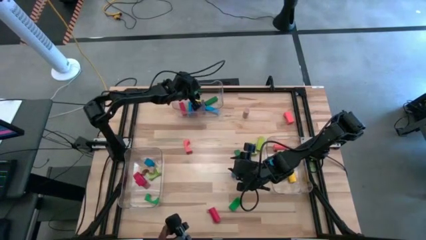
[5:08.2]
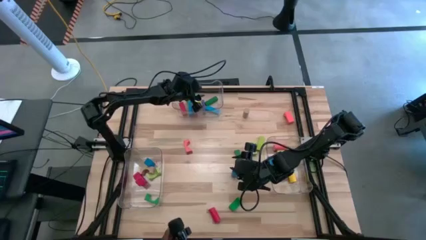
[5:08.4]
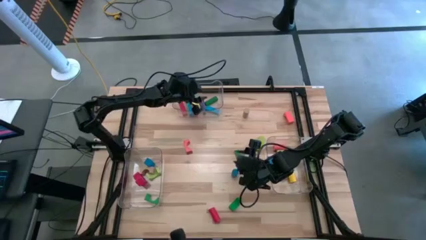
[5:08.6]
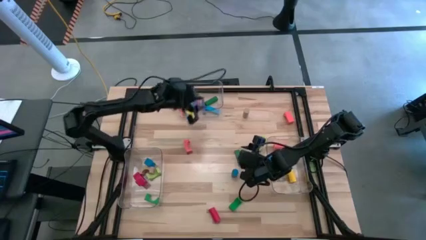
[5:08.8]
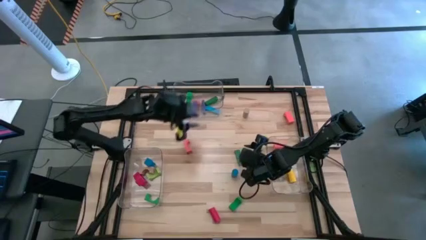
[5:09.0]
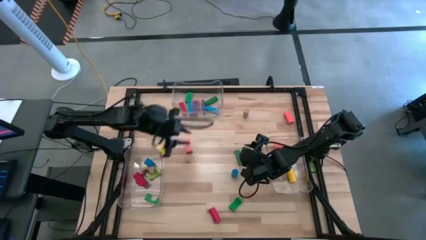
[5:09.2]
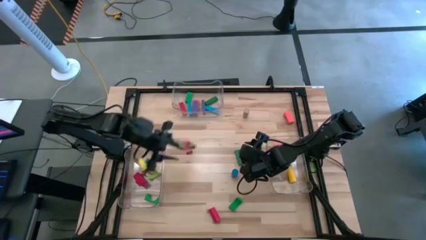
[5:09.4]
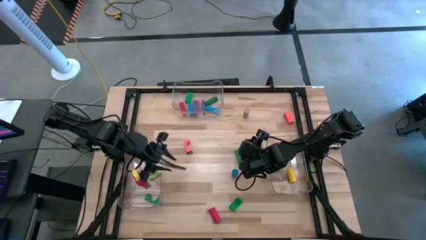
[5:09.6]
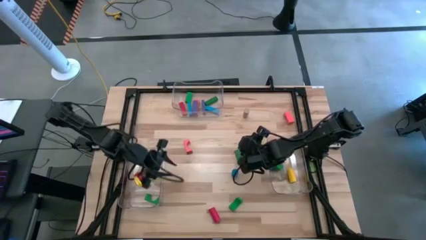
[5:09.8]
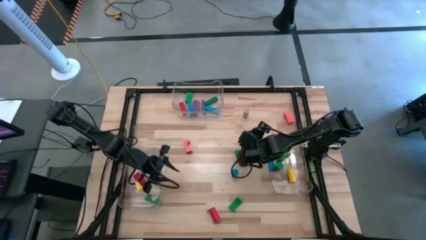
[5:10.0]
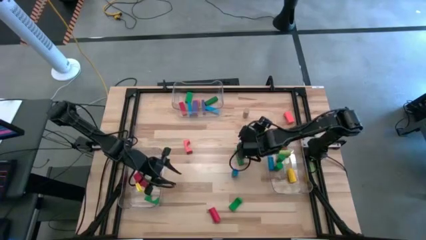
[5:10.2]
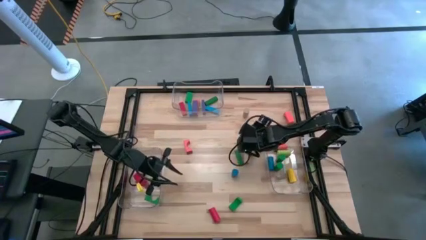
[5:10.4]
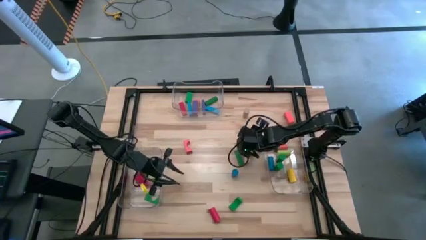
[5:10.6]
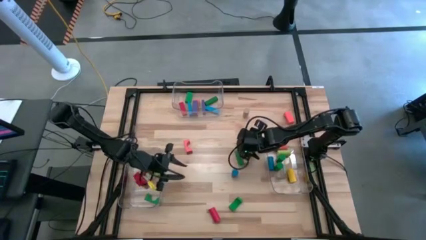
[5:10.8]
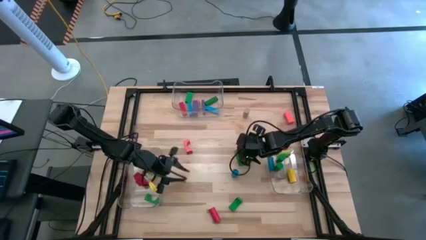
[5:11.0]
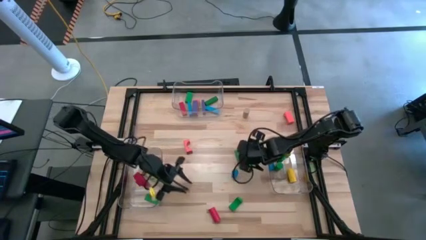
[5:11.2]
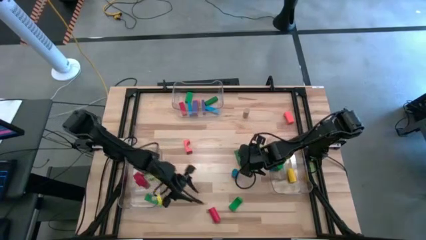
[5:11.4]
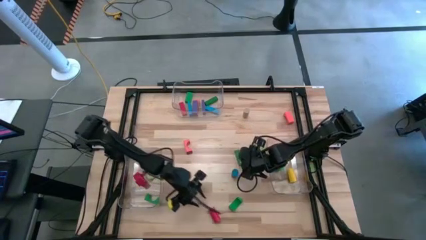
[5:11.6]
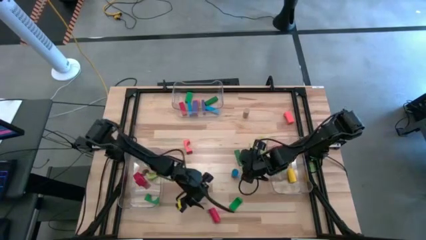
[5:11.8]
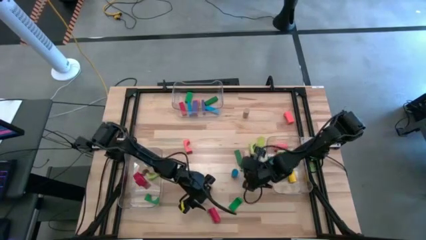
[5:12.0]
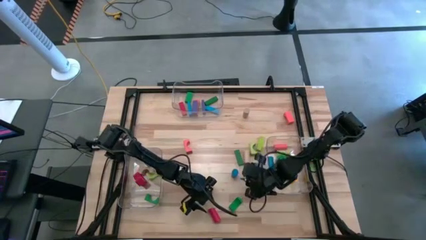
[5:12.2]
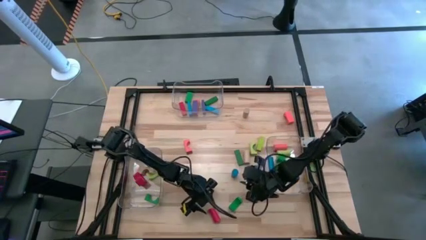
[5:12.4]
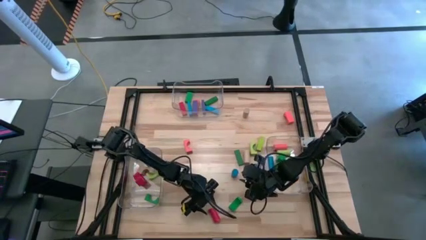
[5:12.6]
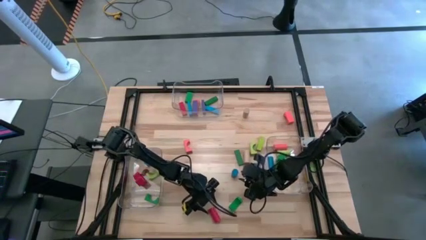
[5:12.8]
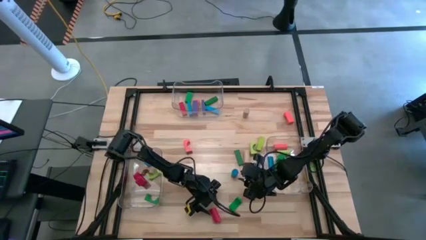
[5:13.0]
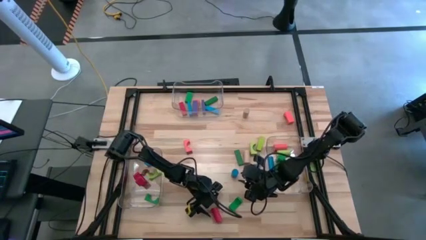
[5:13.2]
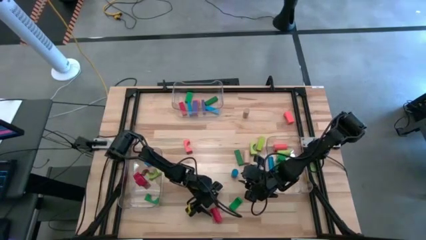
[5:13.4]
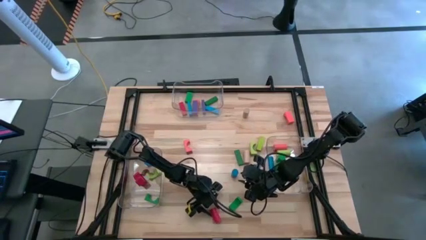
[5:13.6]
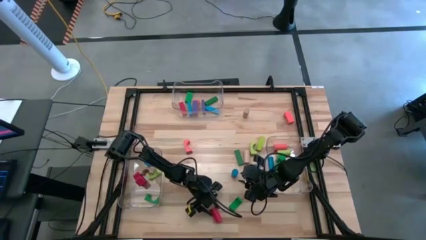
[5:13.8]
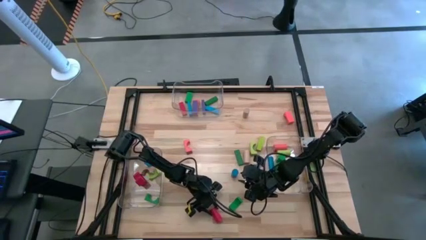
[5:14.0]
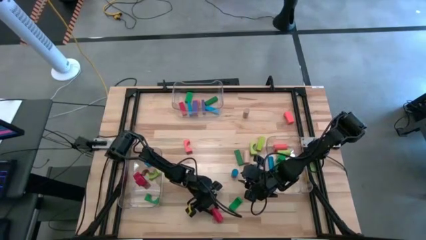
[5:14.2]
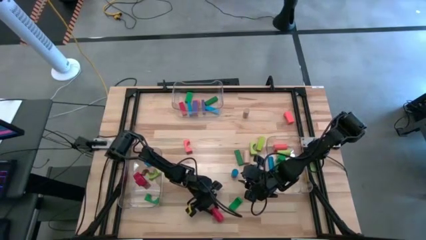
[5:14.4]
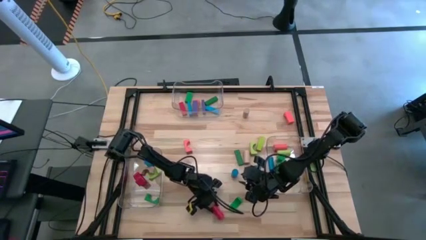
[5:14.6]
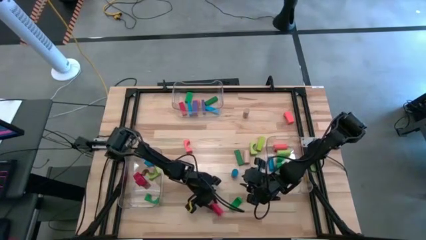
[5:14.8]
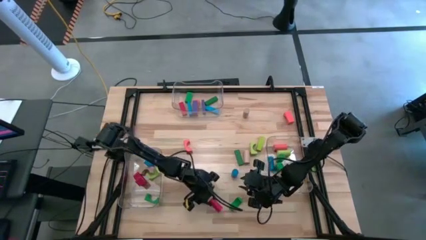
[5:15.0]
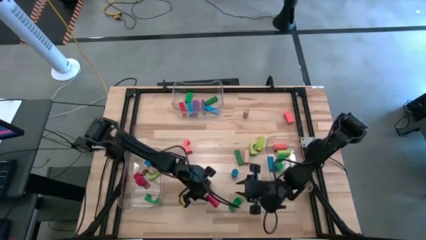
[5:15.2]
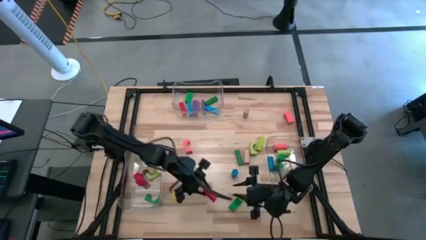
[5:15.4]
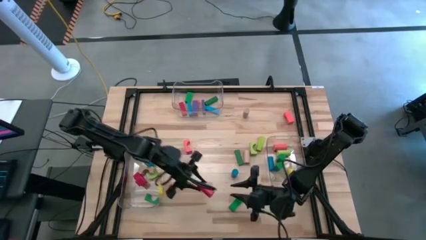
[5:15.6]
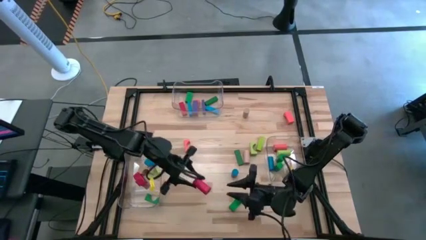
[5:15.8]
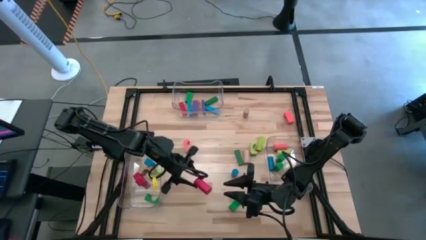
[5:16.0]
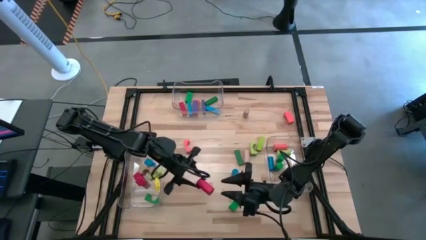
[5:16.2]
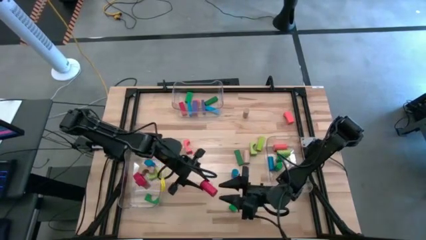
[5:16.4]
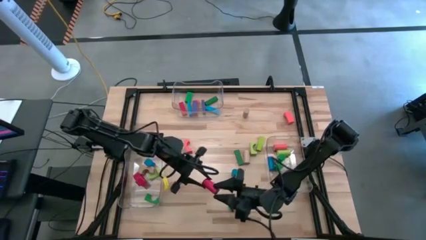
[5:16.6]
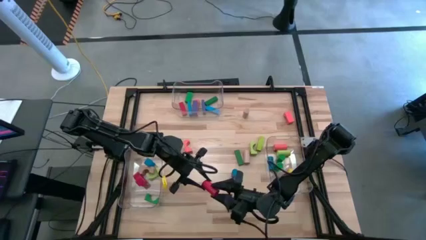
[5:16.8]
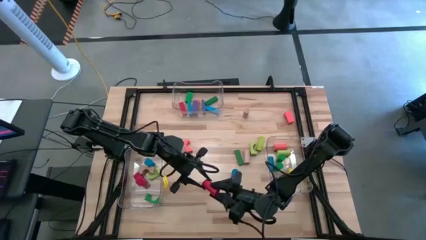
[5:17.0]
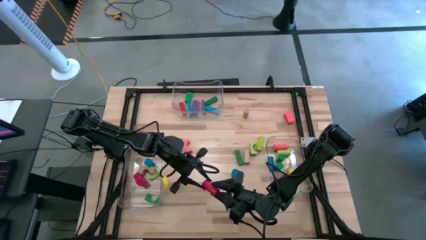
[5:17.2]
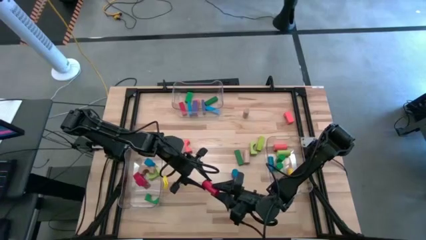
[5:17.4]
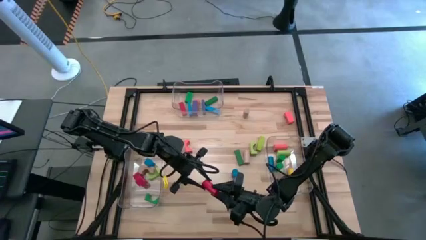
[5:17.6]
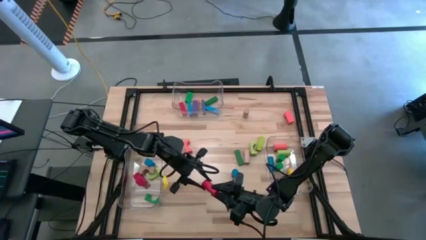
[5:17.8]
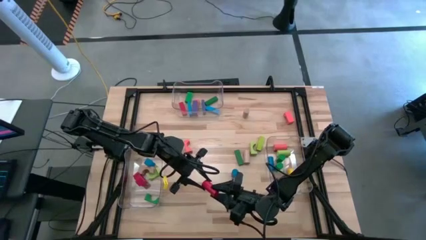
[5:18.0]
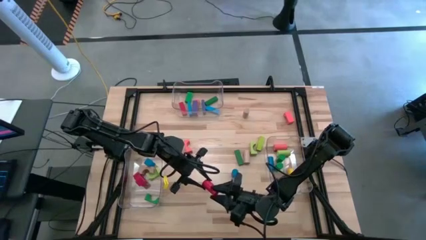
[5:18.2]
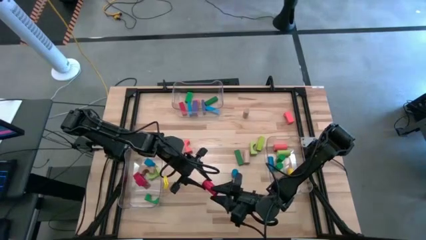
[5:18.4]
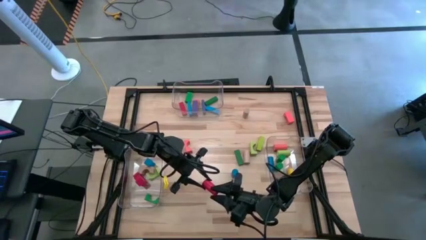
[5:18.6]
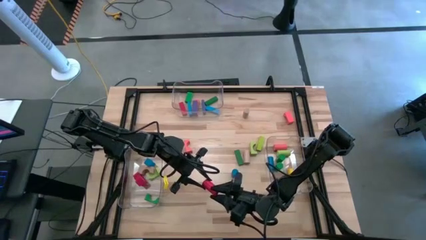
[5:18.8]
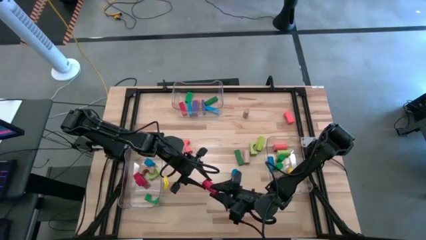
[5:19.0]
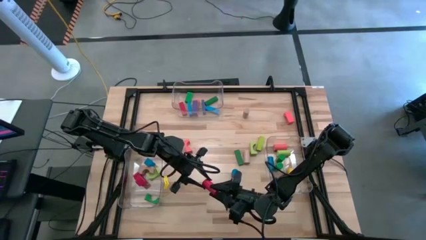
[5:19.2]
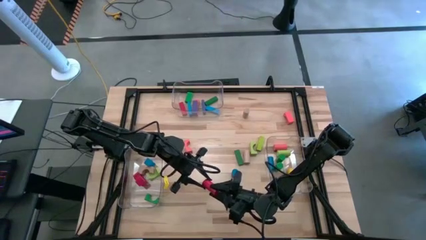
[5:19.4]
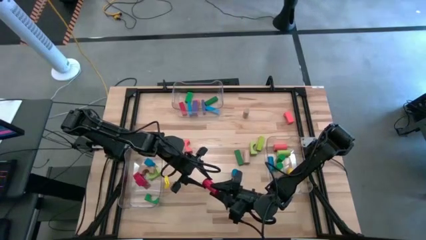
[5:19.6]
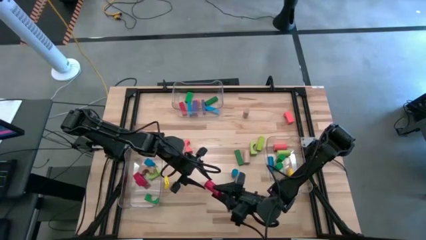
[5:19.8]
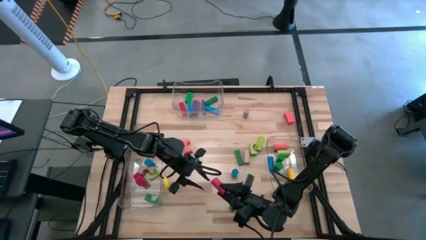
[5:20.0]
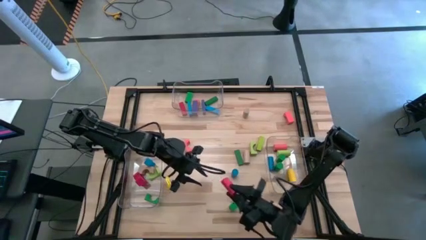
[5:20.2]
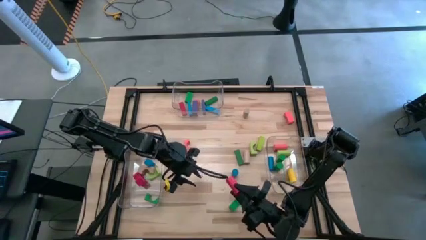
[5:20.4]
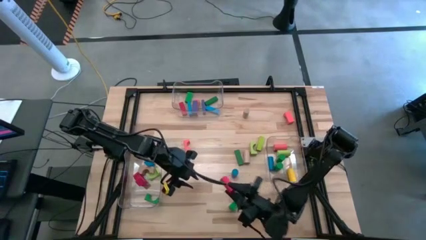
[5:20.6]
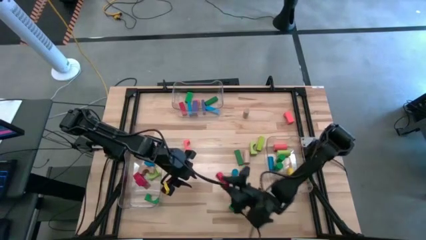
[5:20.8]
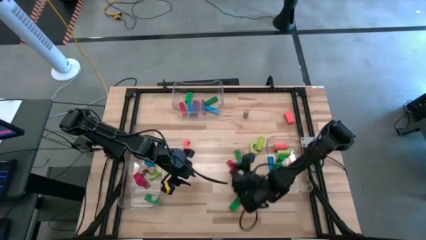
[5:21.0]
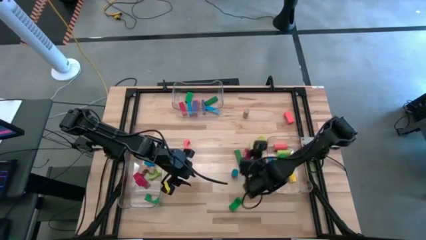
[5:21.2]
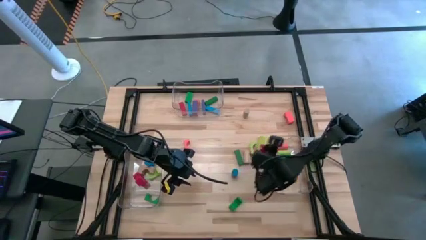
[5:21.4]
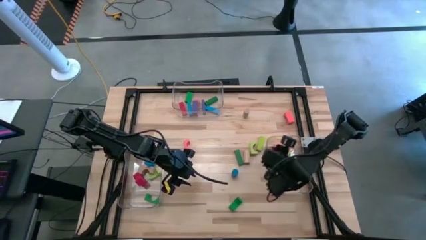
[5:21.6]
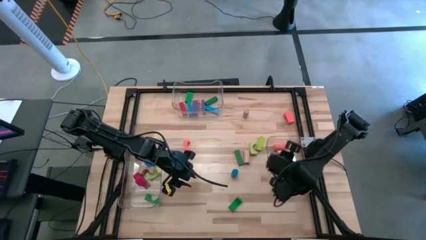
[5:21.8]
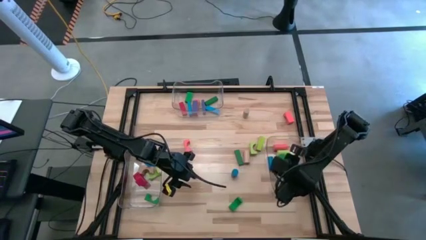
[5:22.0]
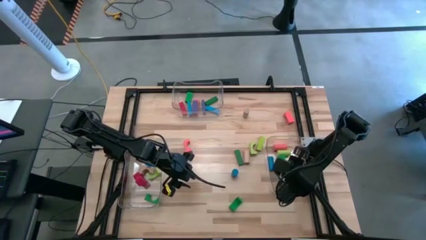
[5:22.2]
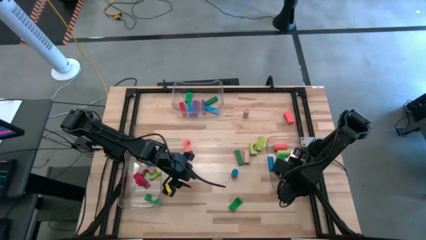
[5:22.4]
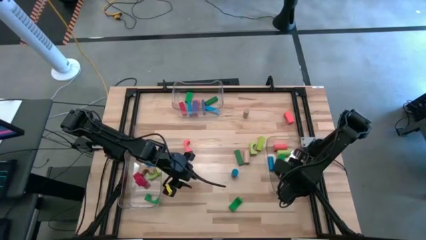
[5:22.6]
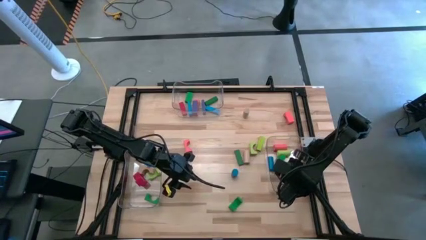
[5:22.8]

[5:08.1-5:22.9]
Task: Sort blocks by size
Put the red cylindrical block into the right transparent bin
